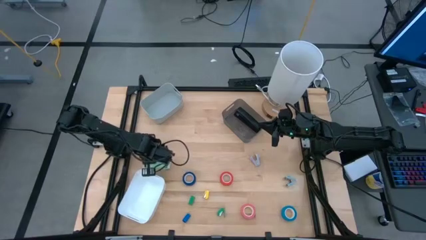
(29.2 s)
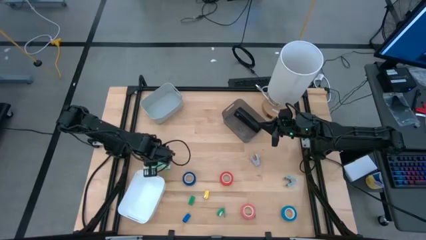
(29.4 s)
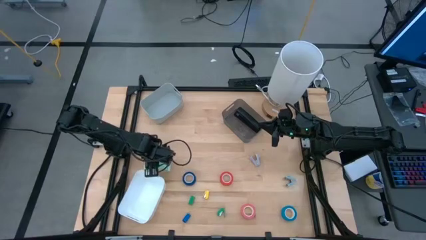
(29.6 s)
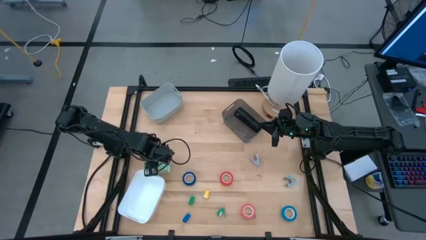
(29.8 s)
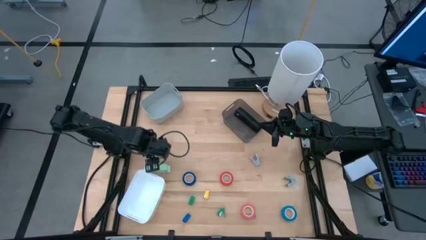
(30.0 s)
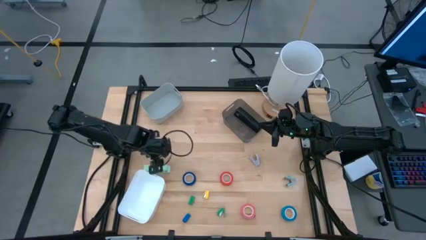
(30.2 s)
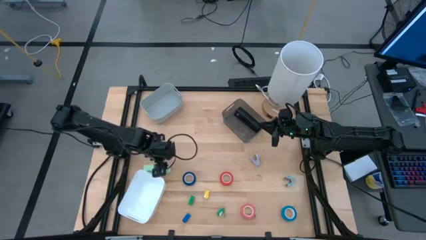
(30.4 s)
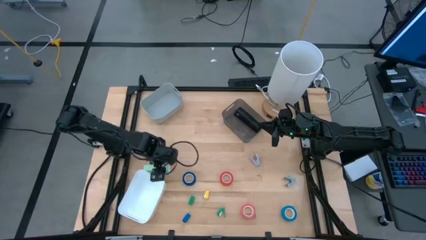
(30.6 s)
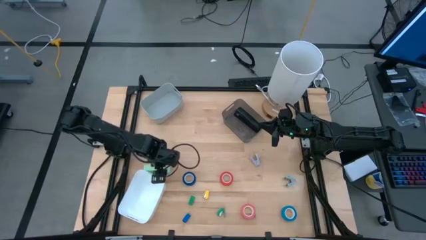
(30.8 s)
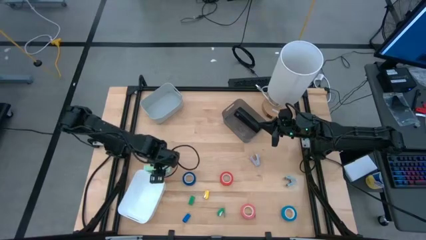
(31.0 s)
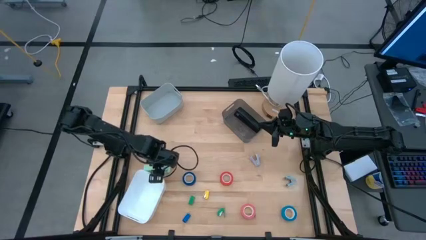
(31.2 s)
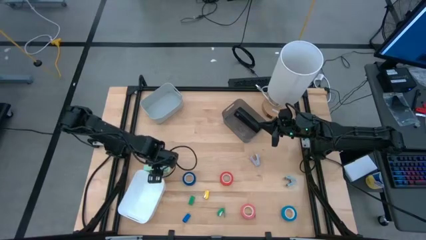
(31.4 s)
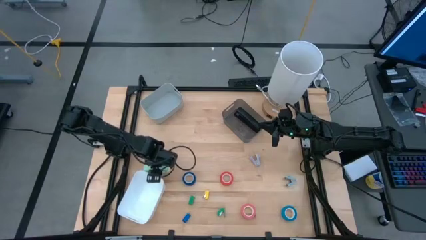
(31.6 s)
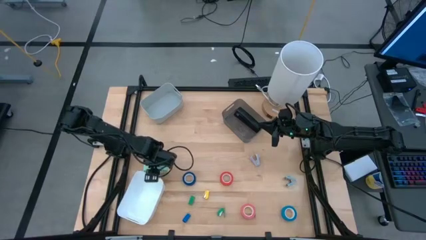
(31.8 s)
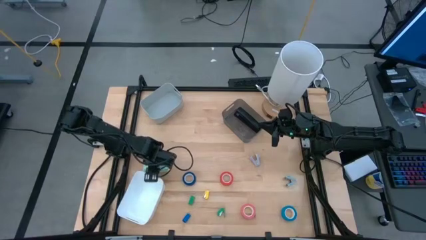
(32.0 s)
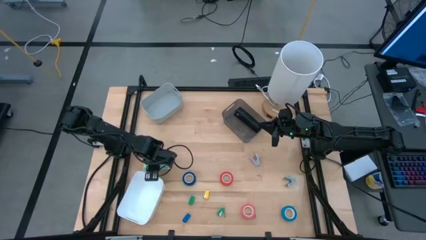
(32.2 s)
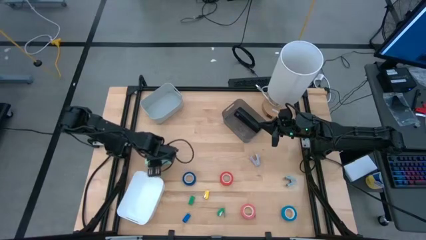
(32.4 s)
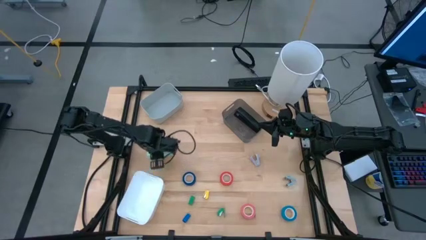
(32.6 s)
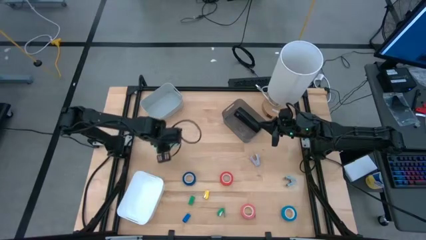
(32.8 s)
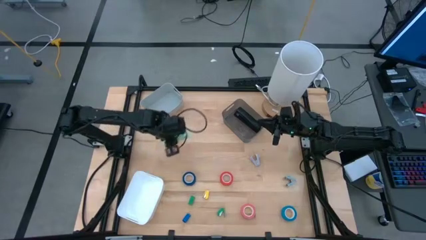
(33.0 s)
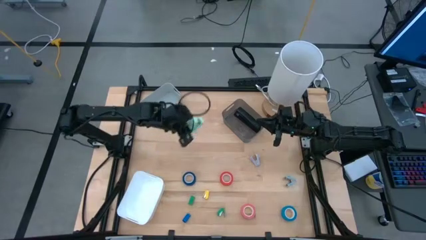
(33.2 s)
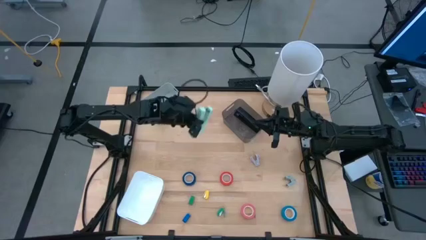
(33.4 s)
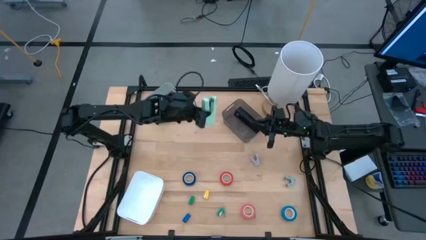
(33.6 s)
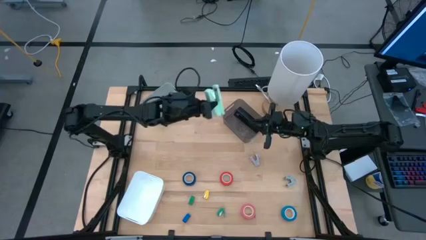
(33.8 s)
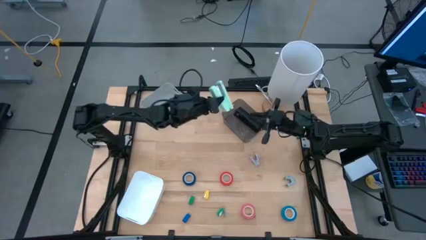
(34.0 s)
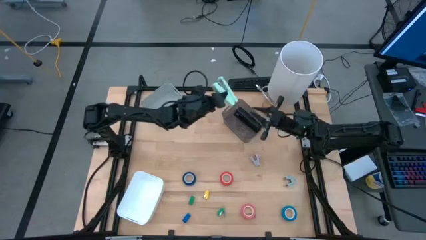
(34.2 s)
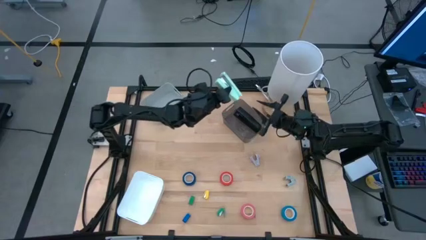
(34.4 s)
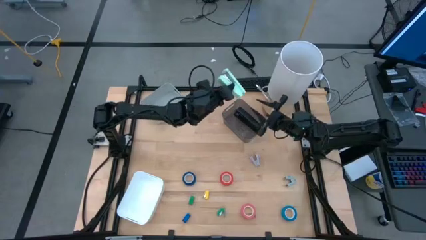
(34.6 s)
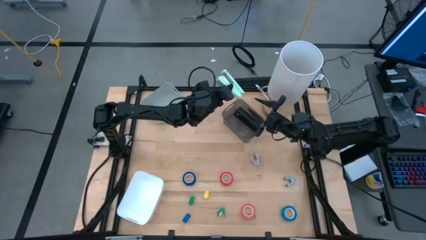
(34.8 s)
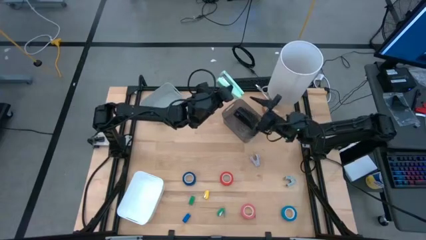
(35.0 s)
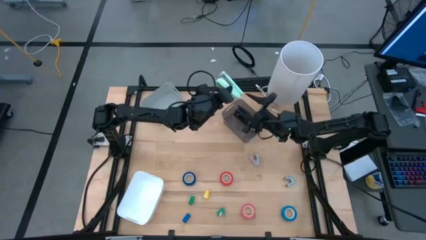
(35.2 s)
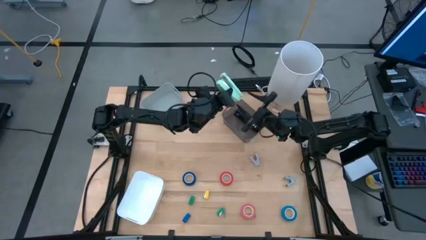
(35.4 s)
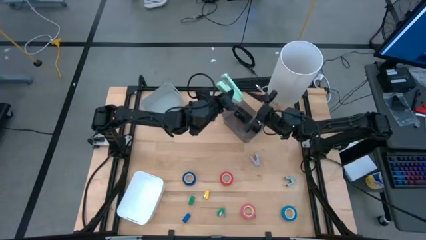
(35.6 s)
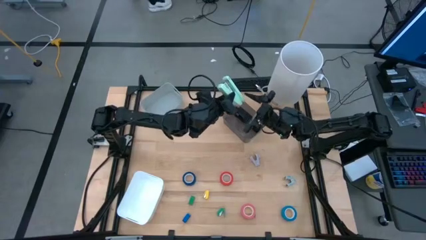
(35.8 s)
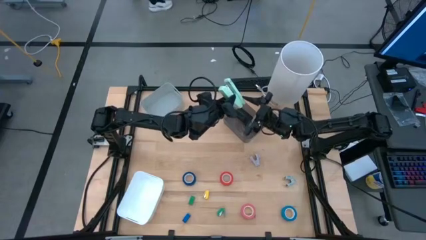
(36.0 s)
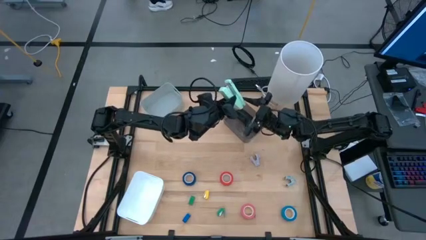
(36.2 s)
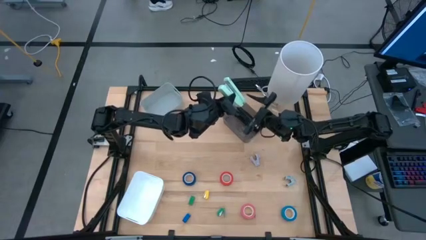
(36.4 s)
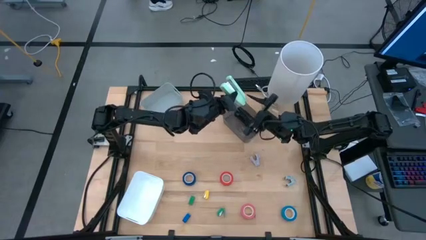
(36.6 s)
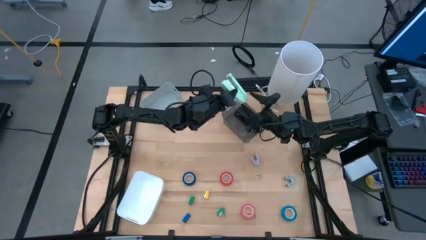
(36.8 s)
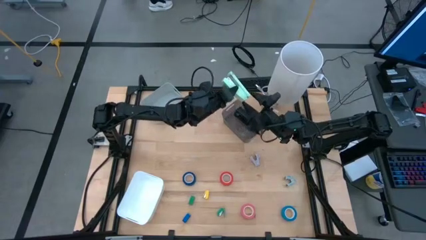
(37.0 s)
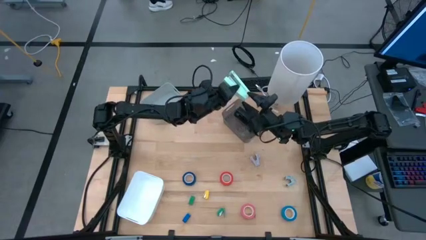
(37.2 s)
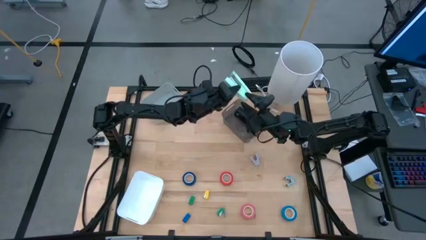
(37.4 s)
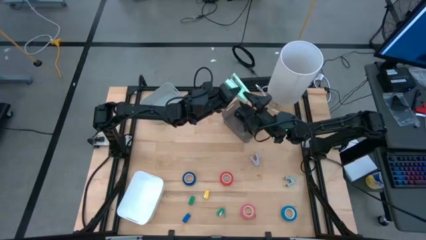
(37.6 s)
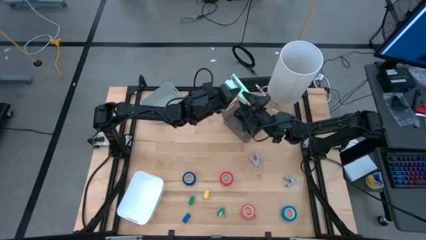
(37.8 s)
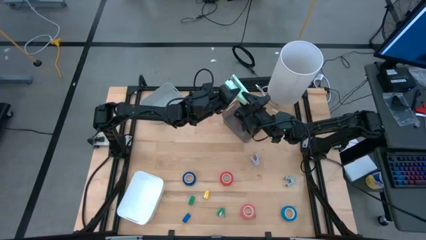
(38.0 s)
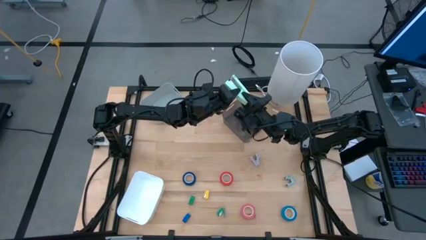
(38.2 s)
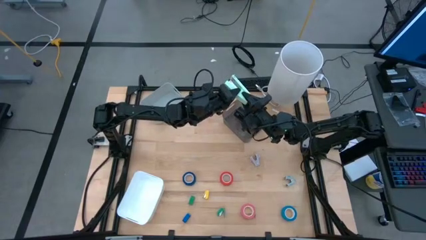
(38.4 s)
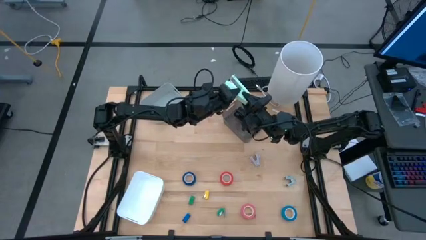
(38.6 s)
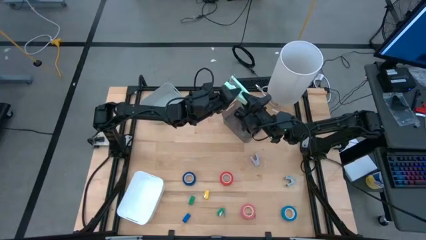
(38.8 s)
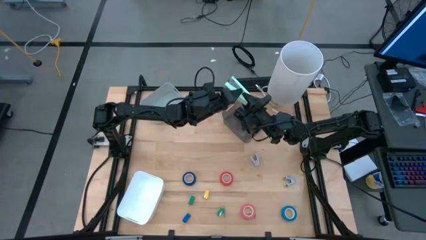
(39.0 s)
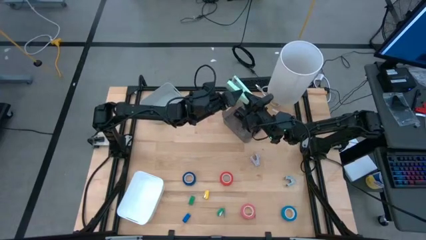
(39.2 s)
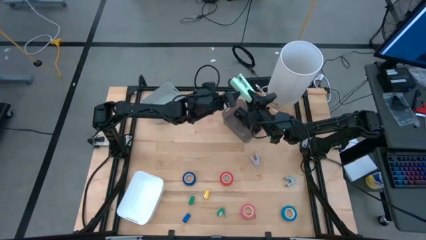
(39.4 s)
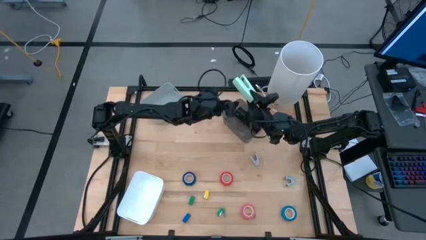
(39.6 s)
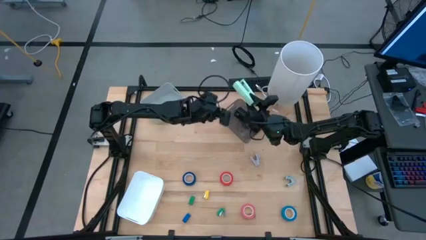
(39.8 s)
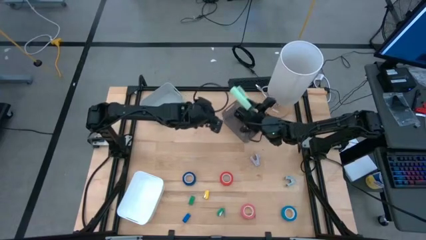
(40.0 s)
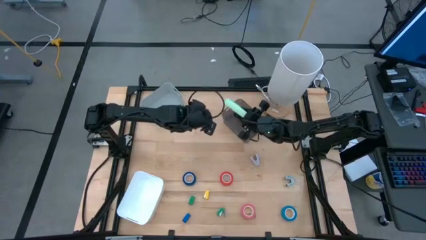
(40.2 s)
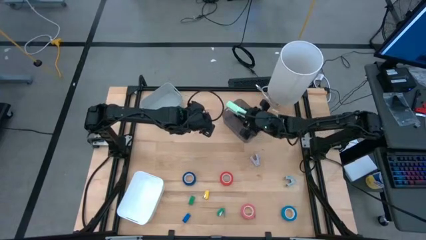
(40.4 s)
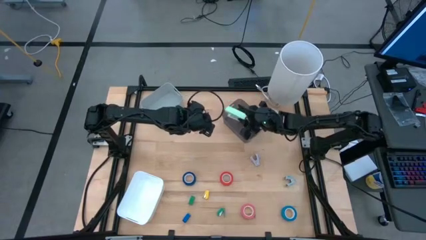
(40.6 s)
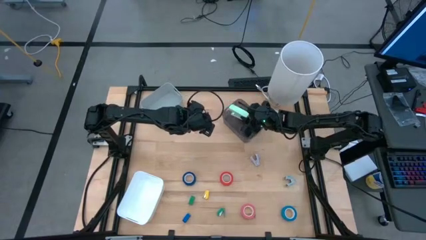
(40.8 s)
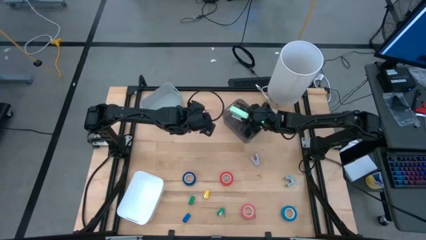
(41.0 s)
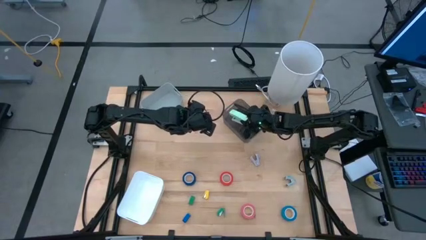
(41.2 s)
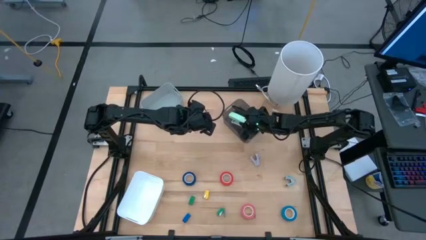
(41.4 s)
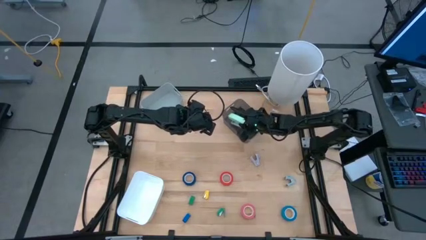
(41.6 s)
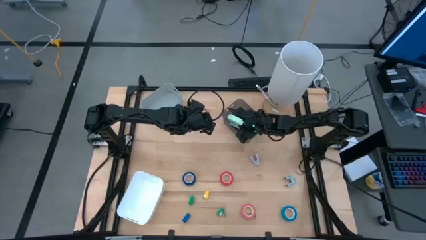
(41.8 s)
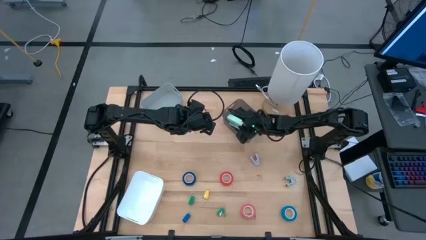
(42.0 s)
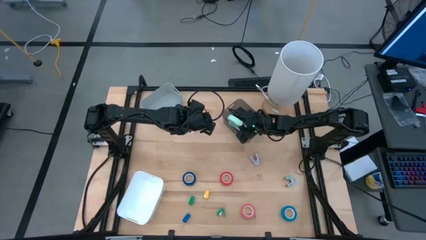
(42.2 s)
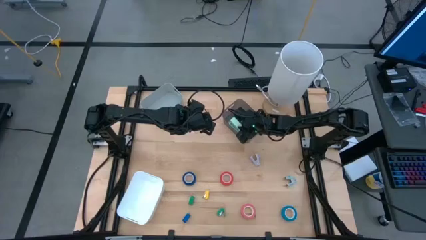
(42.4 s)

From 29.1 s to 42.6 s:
Task: Pick and place Stapler, Stapler remover, tape
Put the large green stapler into the black bin

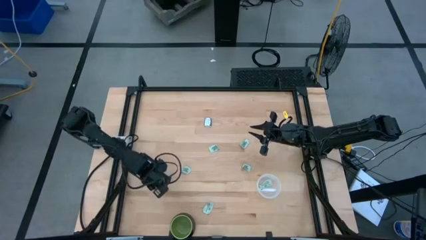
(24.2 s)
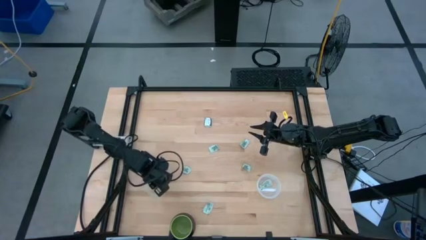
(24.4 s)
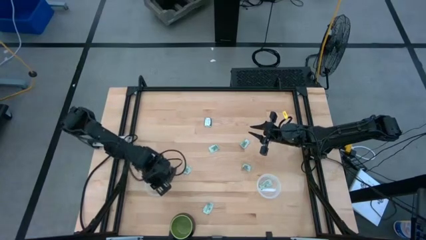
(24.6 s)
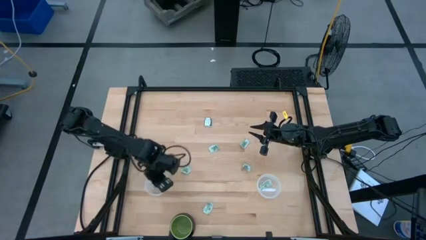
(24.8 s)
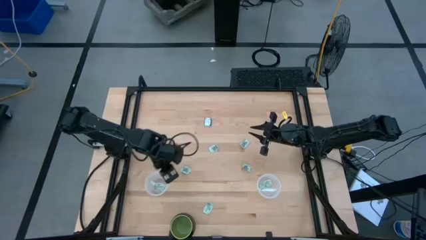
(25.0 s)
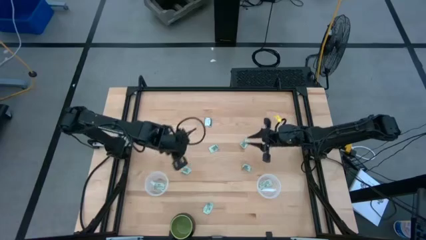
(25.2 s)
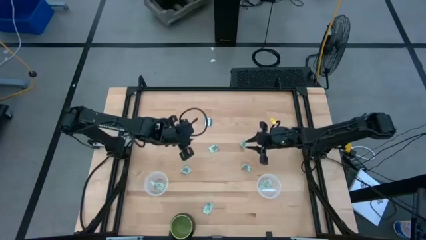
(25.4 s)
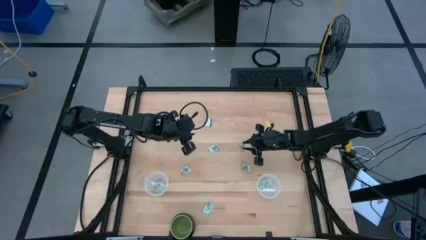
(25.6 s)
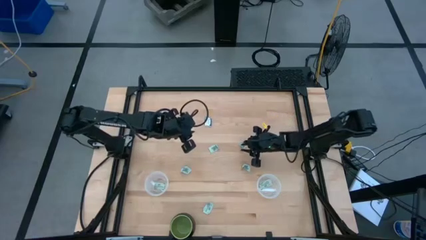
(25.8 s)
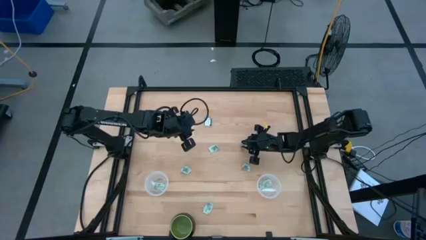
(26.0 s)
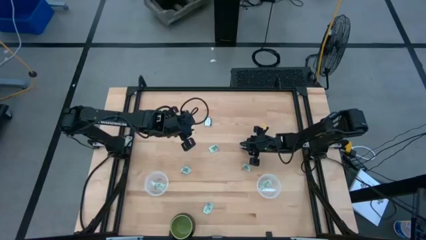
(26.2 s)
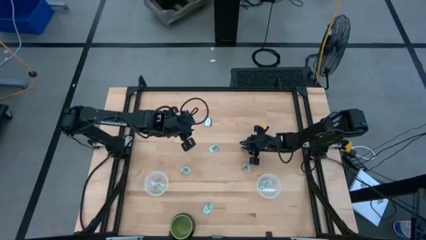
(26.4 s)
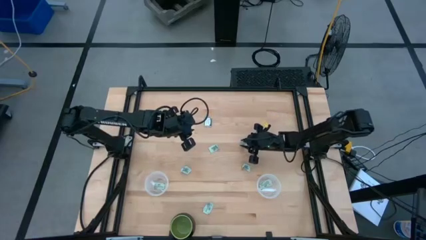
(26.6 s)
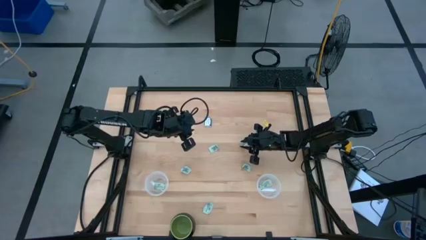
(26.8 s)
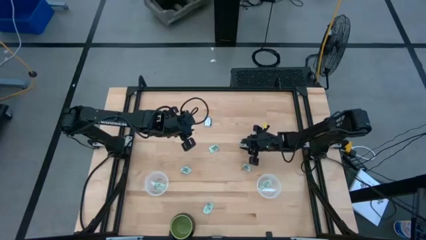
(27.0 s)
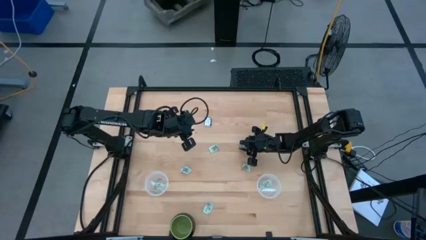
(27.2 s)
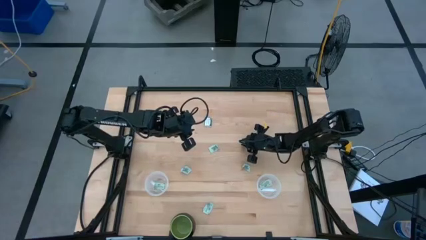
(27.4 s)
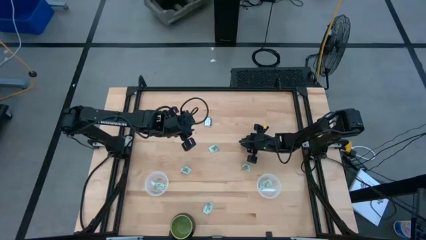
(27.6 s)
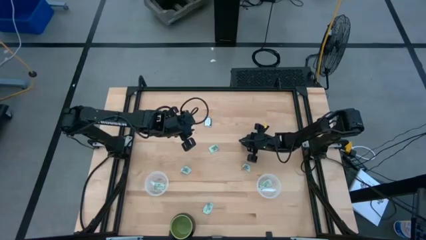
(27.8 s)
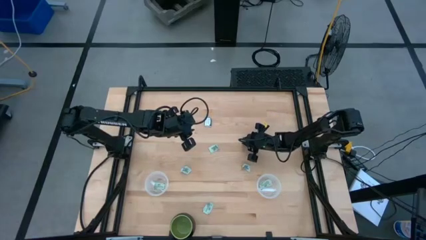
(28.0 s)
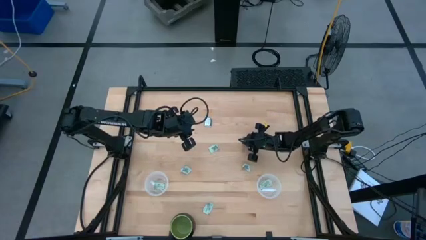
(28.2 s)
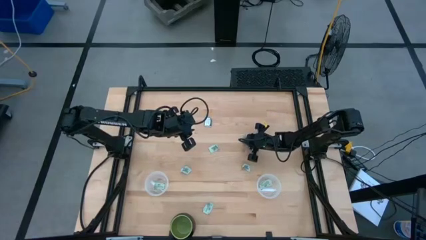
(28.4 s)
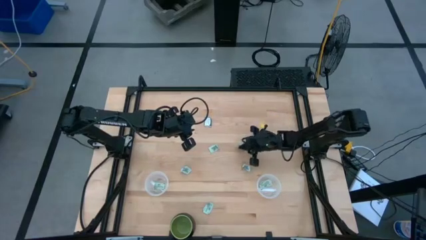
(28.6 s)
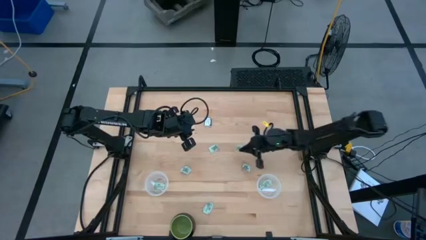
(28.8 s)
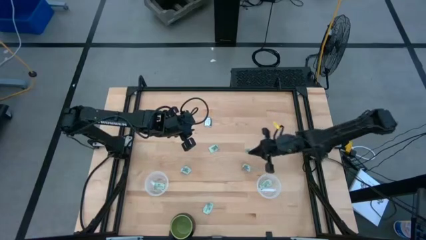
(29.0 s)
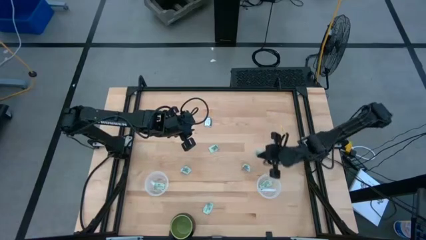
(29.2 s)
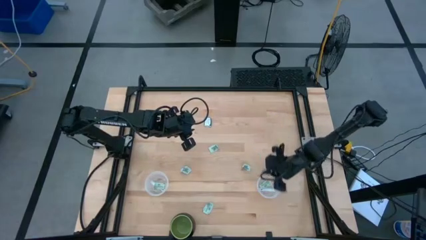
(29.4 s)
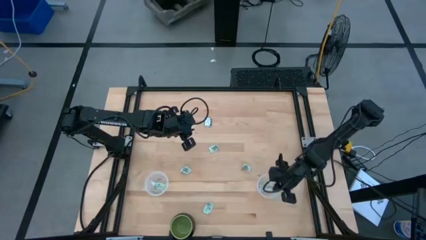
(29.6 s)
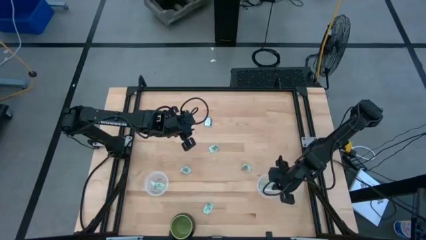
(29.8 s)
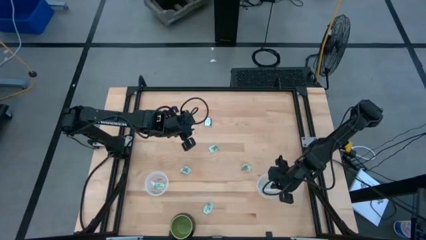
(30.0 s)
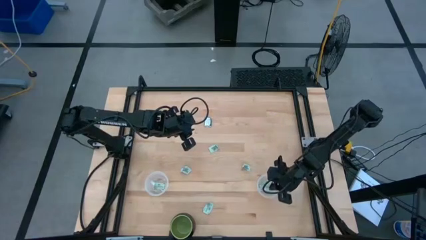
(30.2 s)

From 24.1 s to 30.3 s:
Task: Pick and place Stevia / Truvia into bins
Put the white stevia packet into the right transparent container
